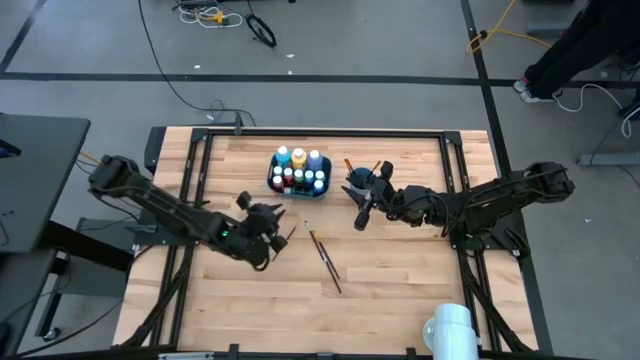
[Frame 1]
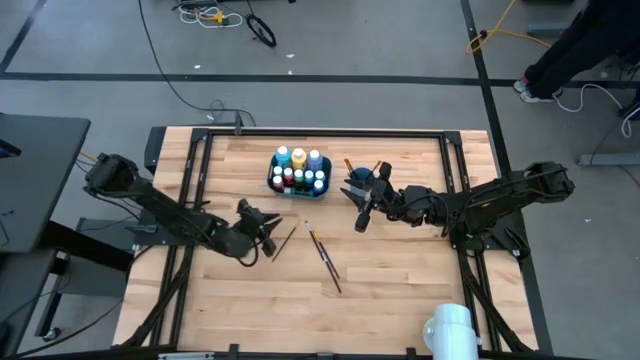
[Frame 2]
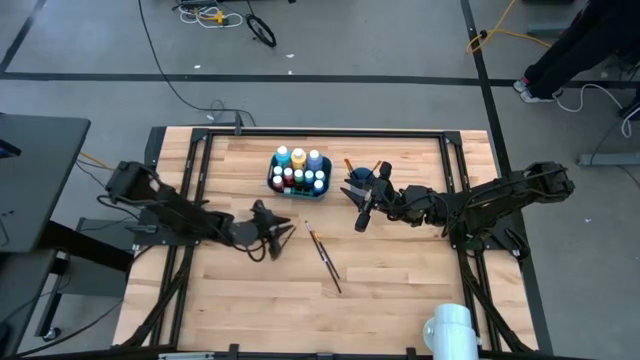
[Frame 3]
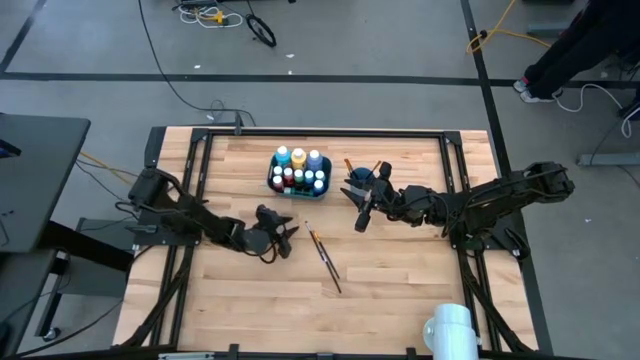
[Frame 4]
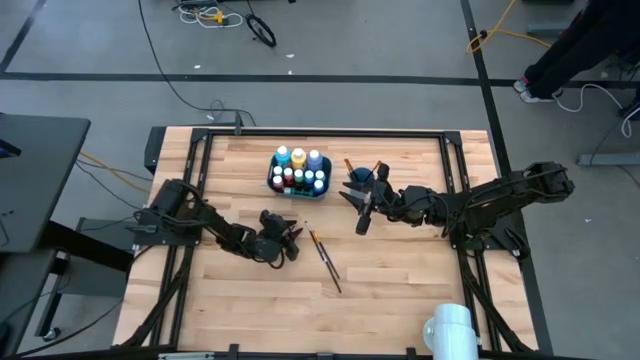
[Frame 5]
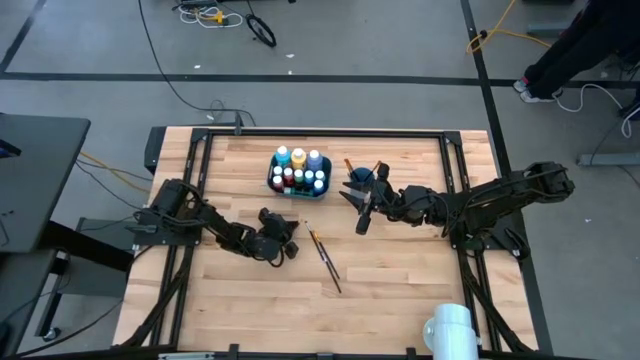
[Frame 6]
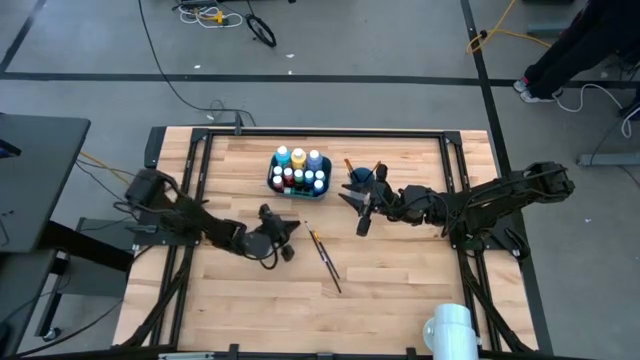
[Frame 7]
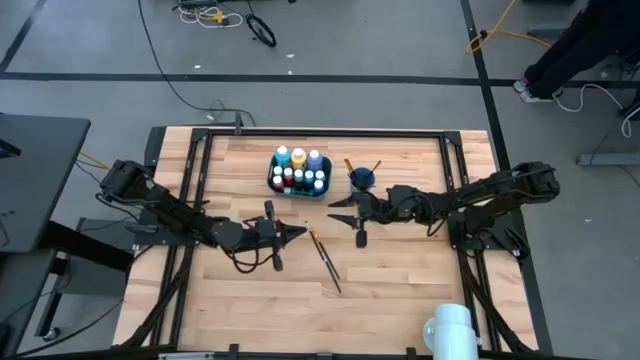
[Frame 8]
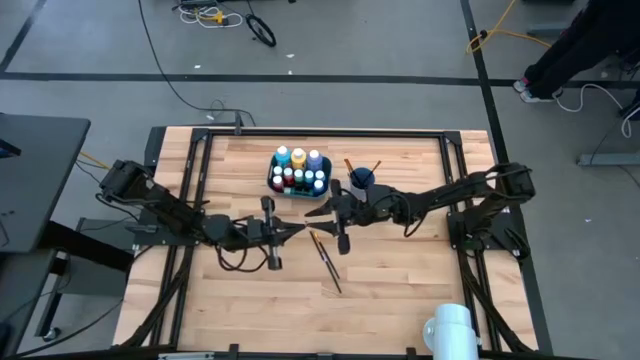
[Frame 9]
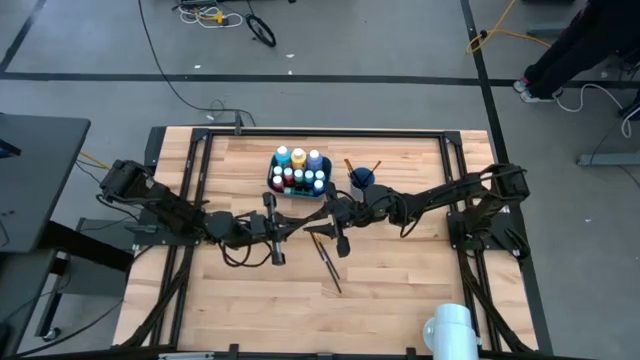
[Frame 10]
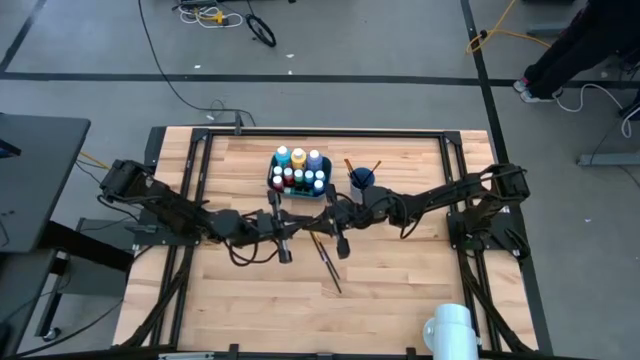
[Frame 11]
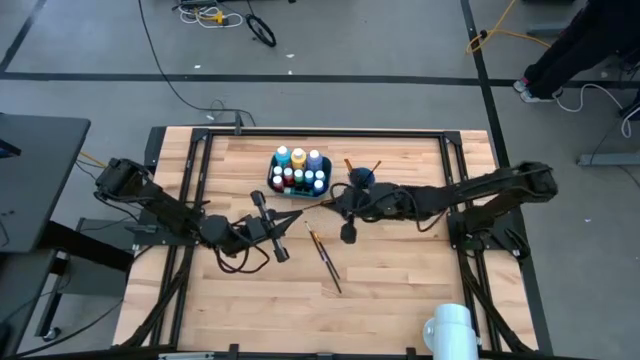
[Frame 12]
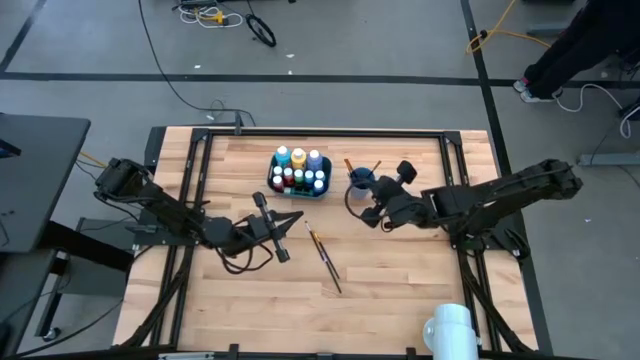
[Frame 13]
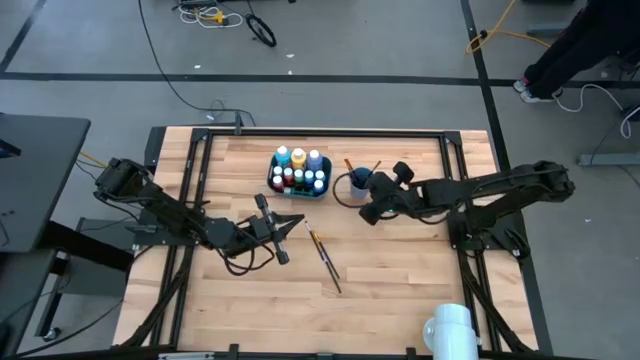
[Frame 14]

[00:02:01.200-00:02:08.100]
Task: Pick & Place Paint Supplies
Put the orange paint brush into the blue cup

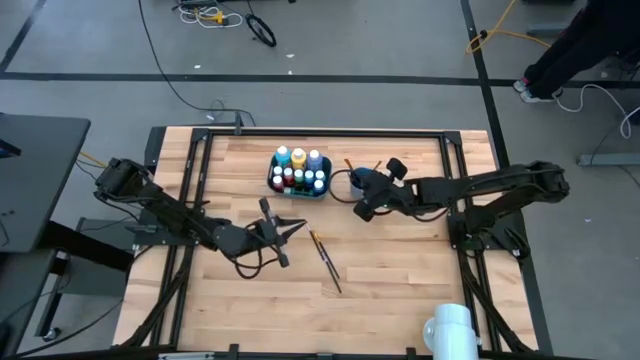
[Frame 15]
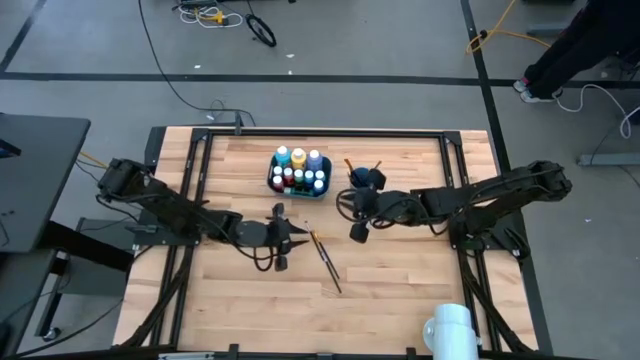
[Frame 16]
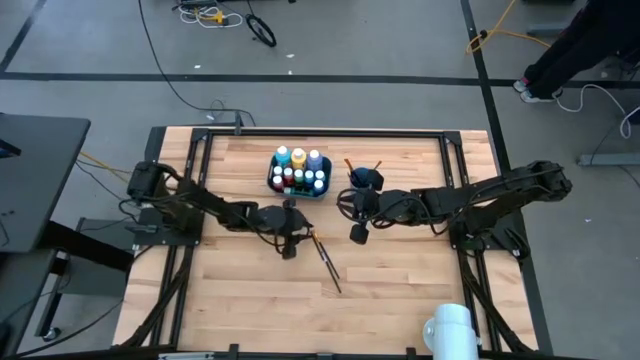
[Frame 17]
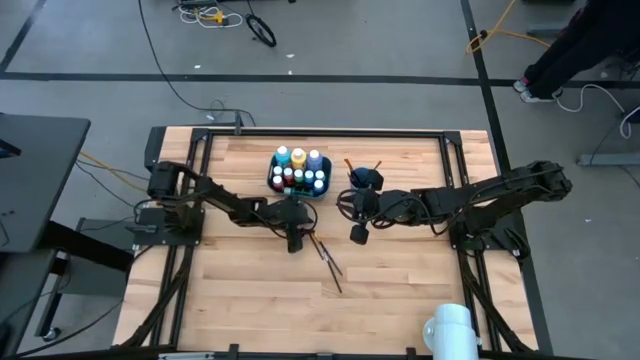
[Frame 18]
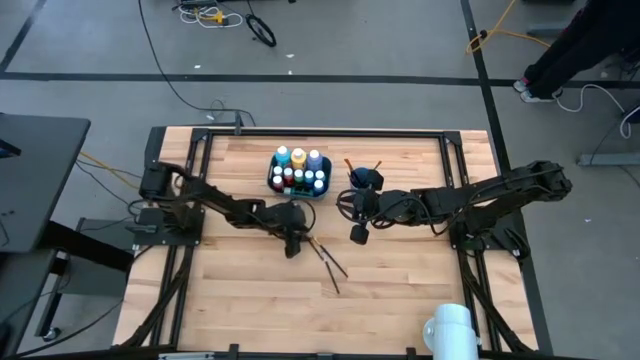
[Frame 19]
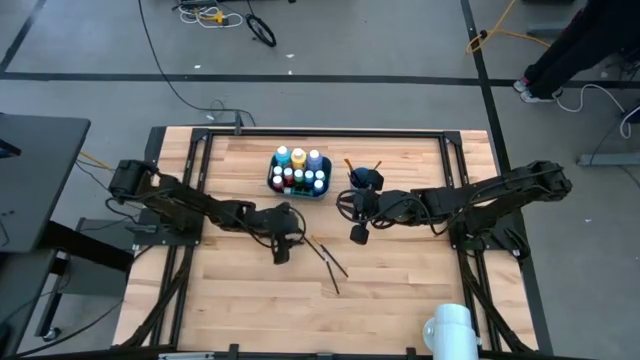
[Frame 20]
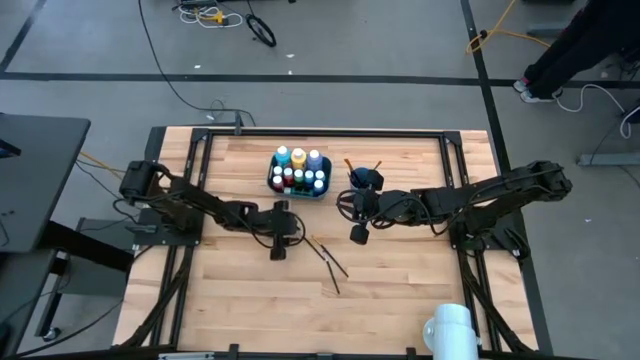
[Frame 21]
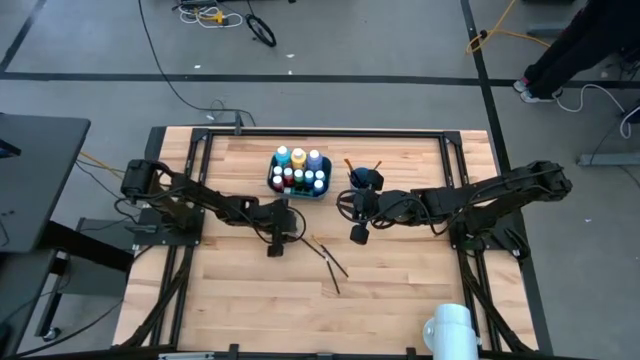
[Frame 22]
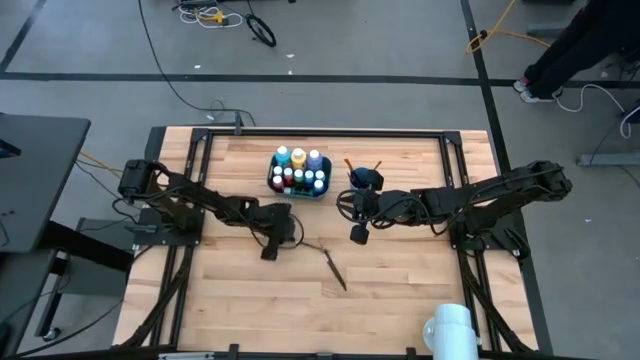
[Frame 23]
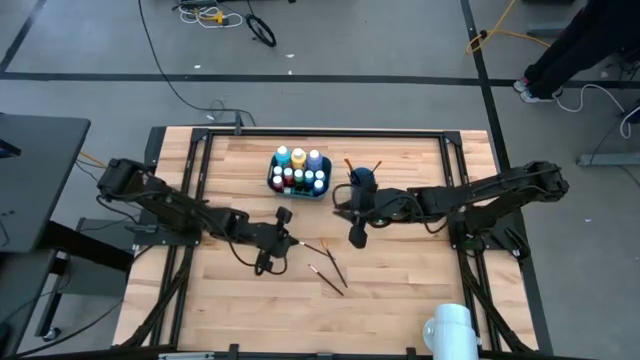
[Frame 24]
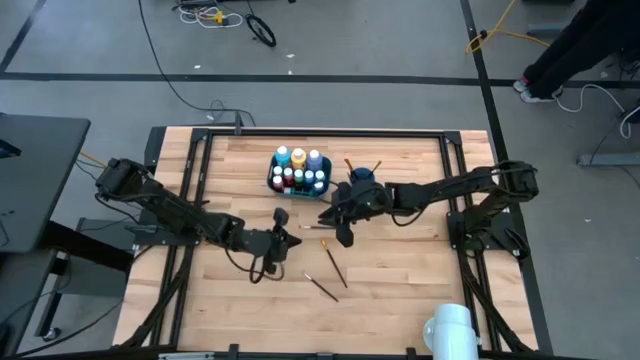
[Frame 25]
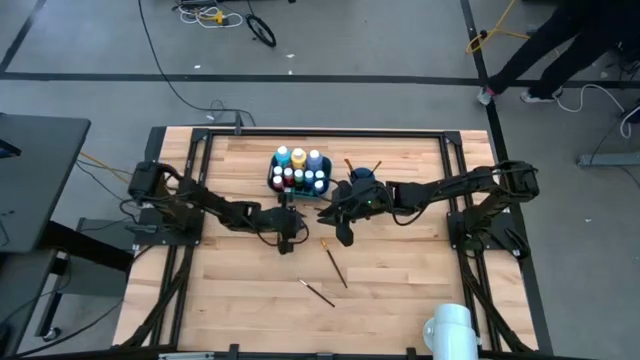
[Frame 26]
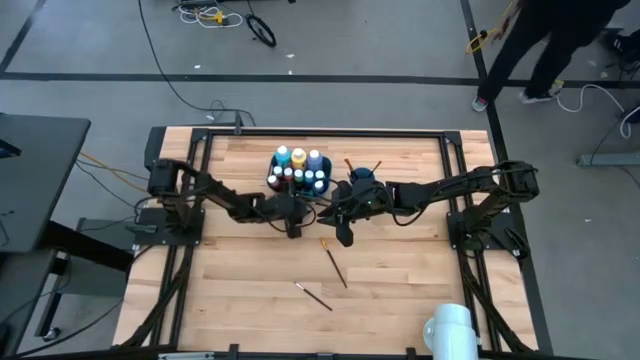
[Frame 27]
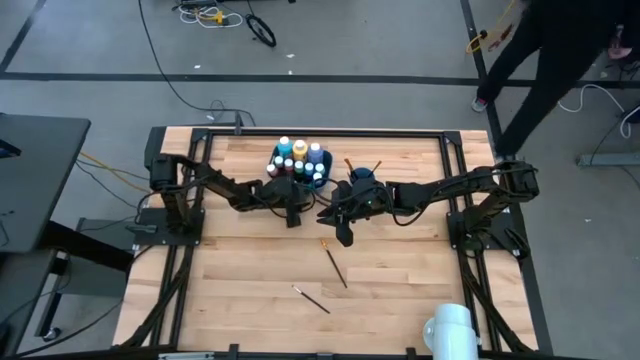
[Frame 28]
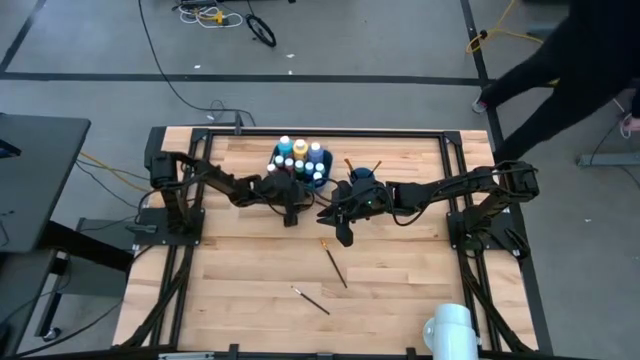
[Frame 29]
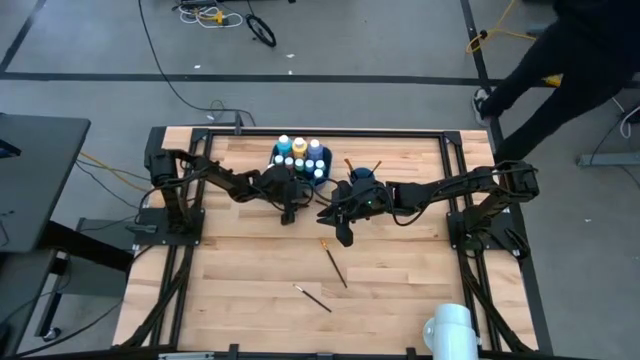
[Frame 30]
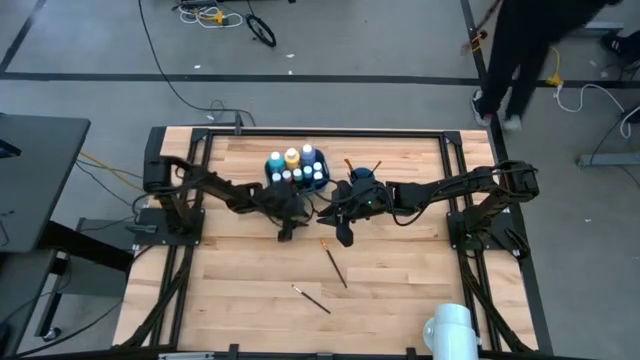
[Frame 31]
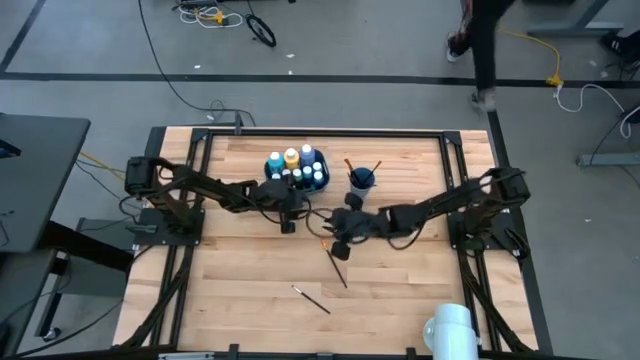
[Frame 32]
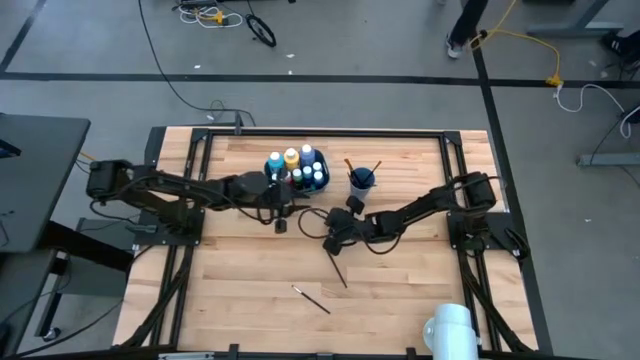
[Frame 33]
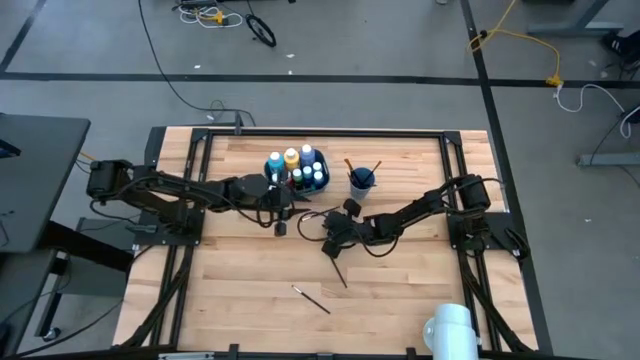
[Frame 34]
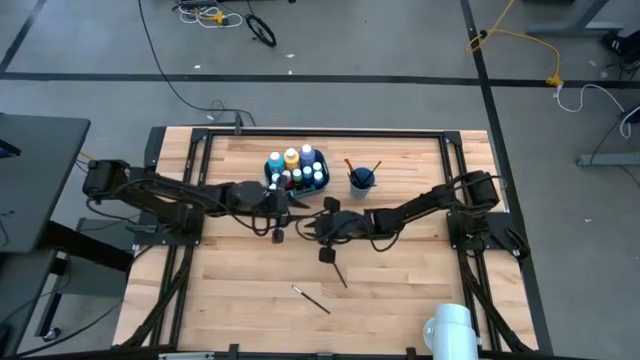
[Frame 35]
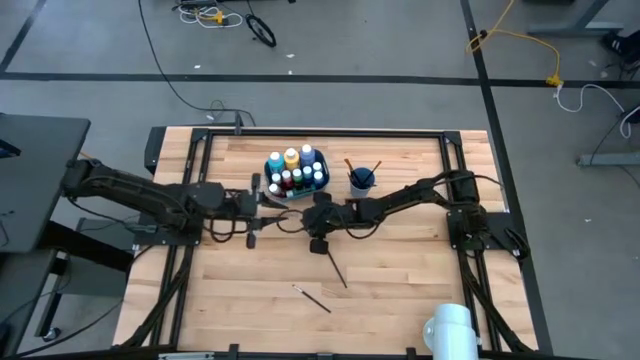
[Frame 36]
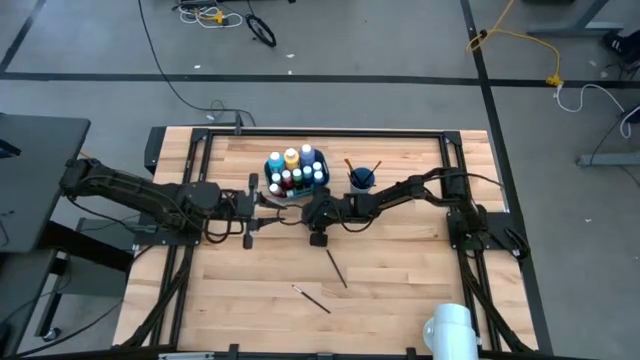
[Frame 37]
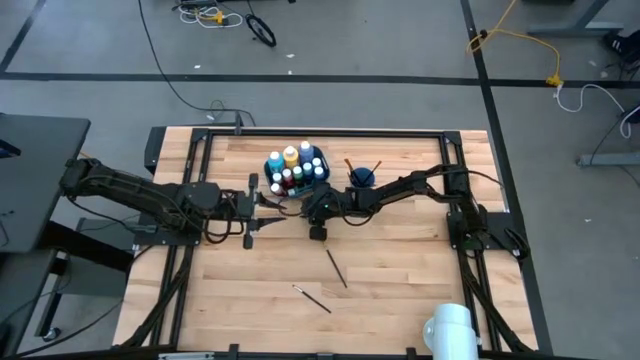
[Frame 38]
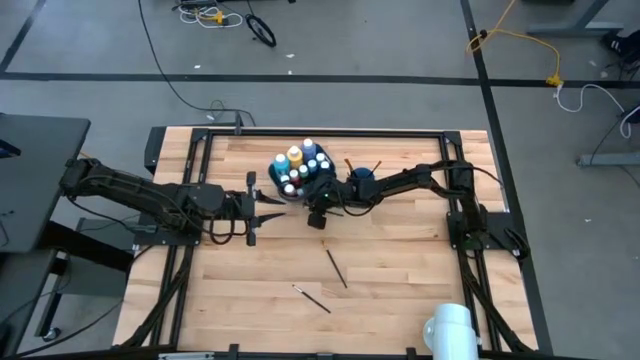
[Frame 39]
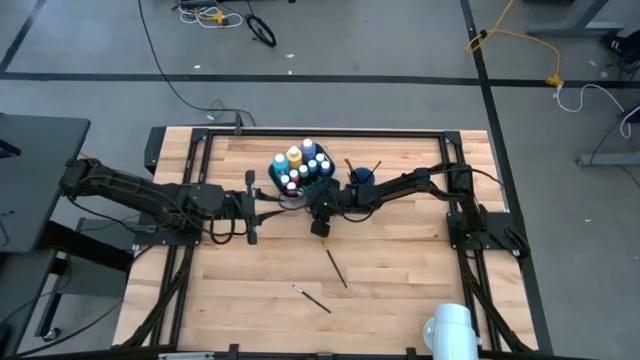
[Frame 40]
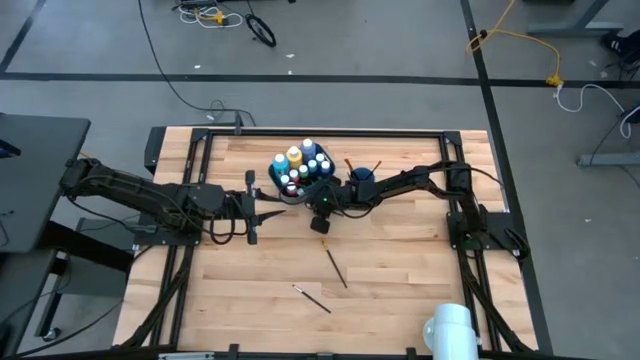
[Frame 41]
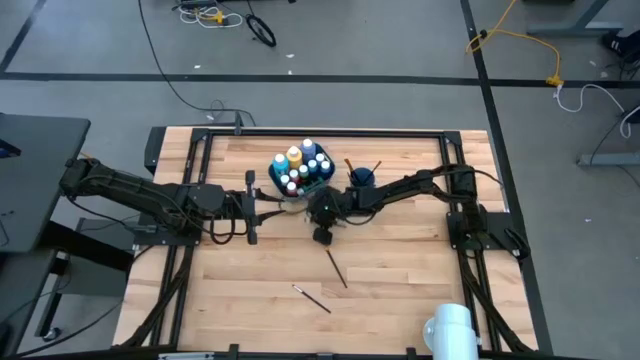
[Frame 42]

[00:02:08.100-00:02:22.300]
Put the silver paint brush into the blue cup
